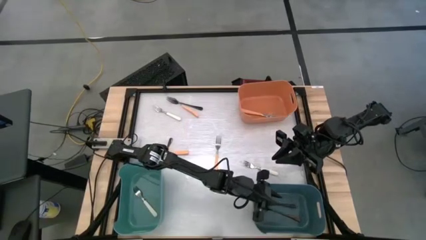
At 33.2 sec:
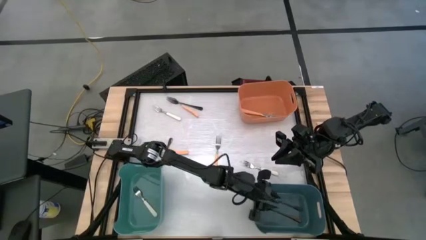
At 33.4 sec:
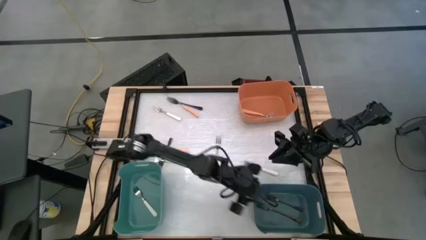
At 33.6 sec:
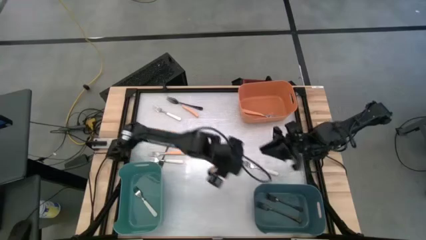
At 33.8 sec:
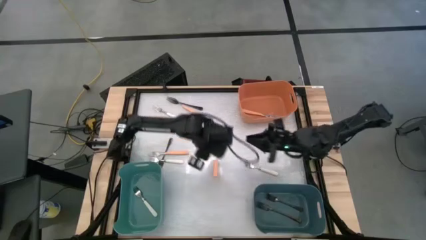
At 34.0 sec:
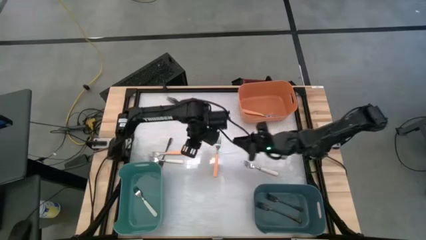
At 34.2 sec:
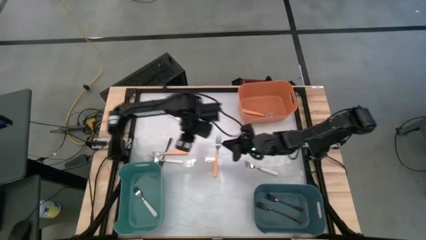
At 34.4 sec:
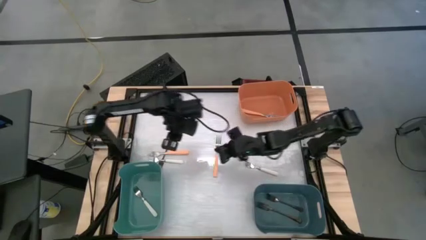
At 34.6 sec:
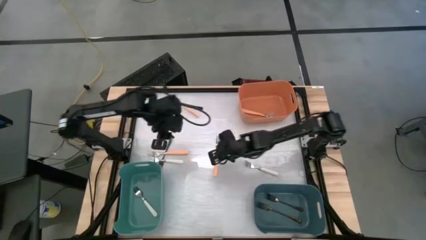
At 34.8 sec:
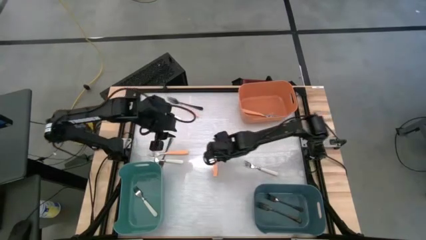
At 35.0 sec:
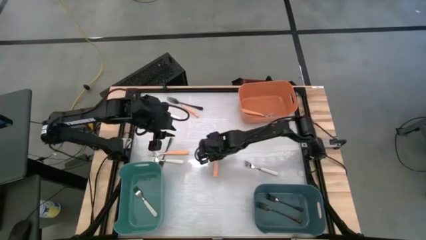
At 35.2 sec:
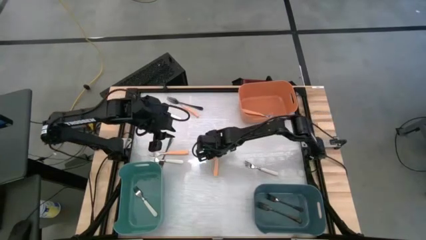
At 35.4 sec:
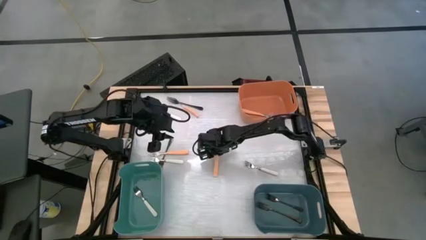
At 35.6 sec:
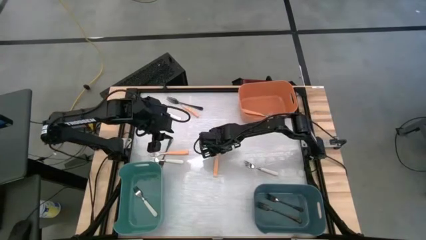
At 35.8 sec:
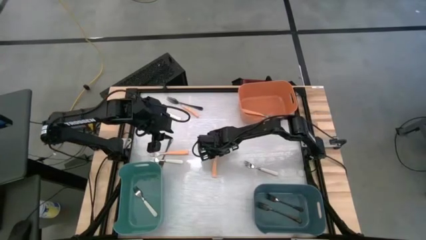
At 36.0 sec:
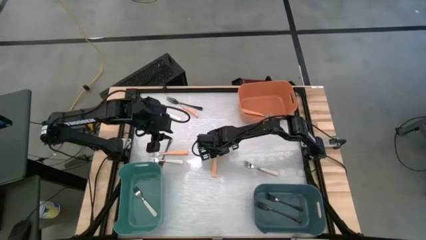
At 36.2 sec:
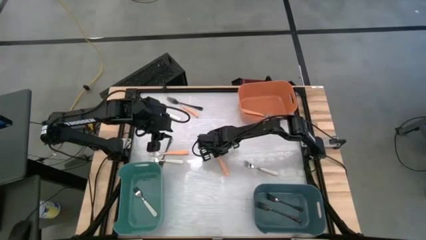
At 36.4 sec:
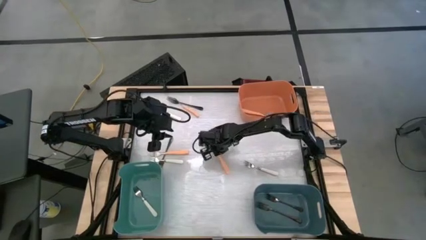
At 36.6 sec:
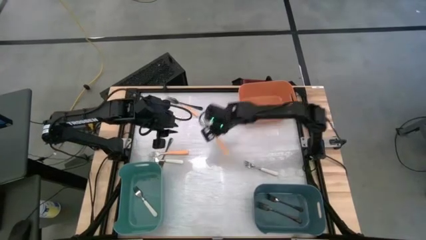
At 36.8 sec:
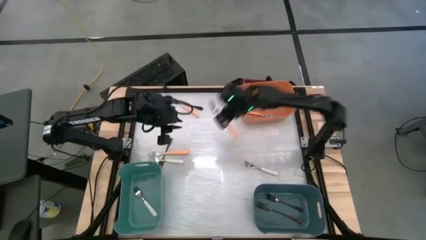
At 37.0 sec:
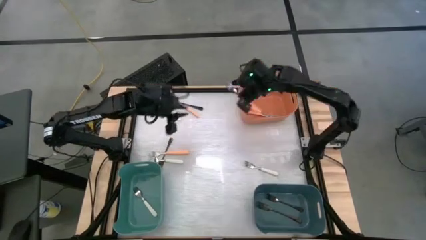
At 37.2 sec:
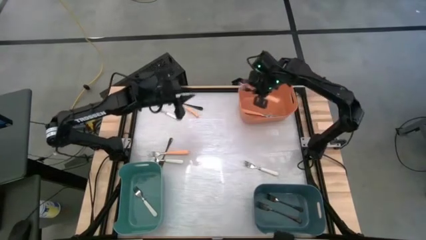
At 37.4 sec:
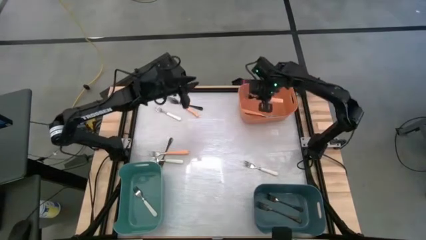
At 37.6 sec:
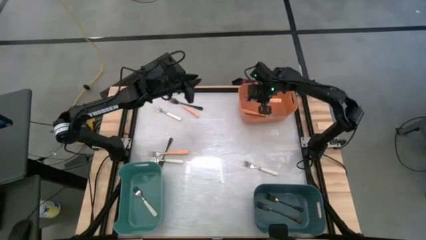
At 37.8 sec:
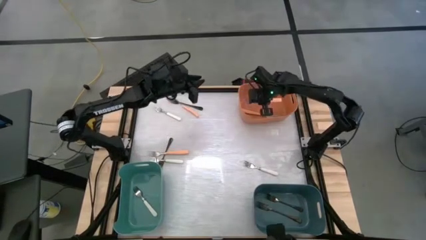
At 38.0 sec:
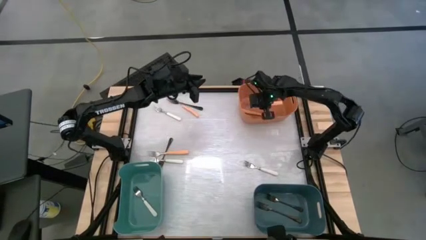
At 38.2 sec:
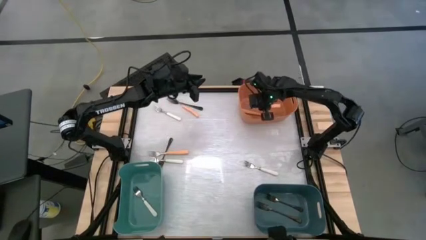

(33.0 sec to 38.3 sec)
Task: Sort silverware by color (type)
Put the orange fork into the orange bin

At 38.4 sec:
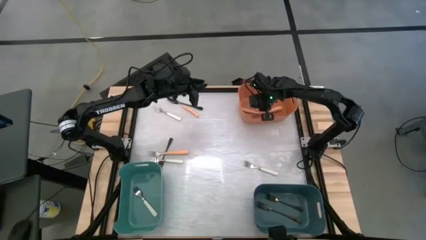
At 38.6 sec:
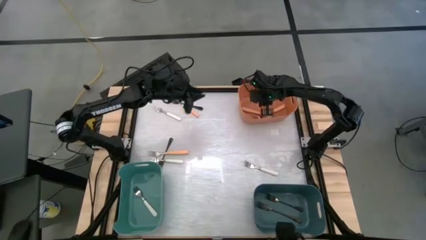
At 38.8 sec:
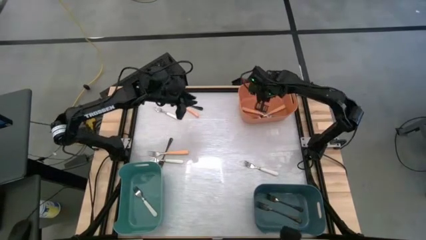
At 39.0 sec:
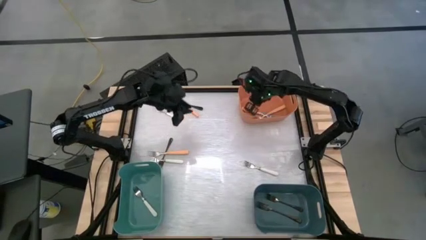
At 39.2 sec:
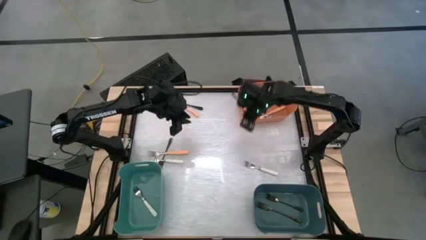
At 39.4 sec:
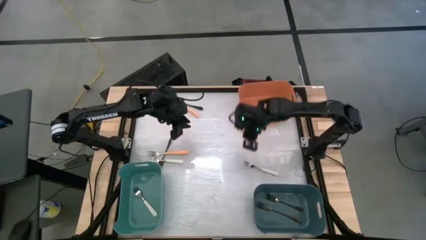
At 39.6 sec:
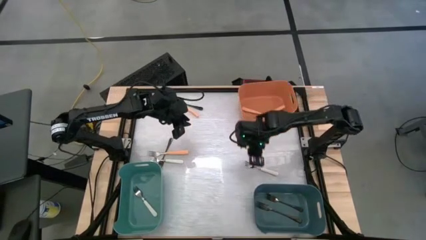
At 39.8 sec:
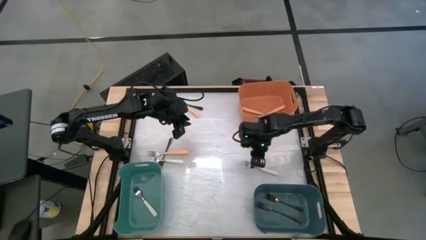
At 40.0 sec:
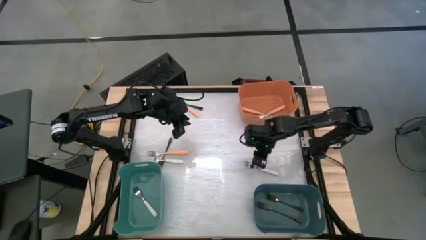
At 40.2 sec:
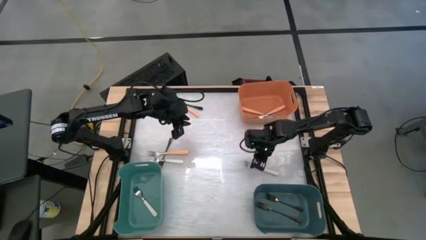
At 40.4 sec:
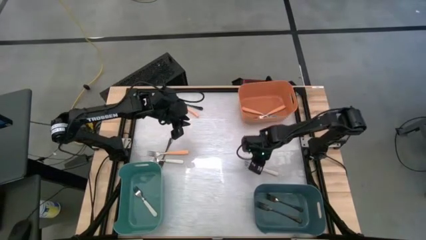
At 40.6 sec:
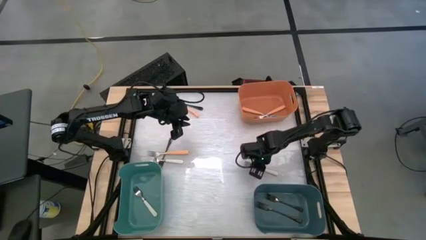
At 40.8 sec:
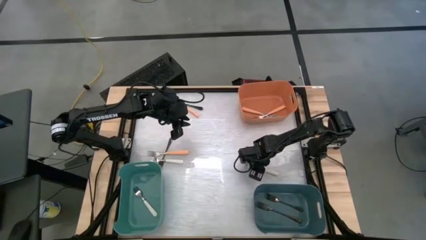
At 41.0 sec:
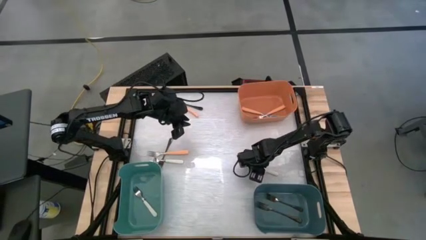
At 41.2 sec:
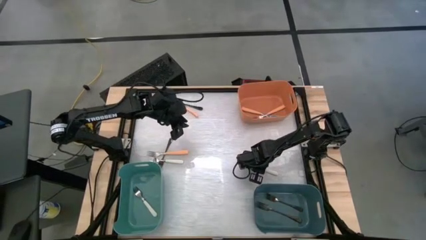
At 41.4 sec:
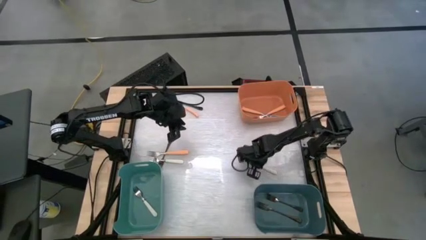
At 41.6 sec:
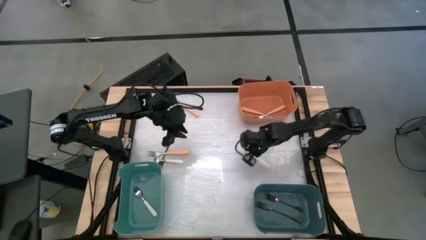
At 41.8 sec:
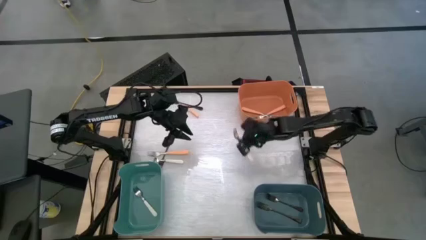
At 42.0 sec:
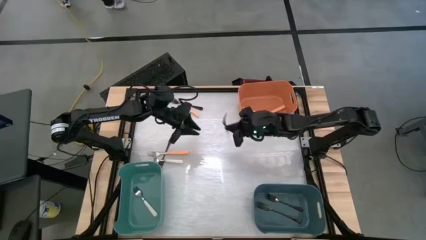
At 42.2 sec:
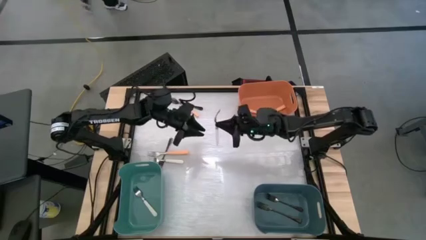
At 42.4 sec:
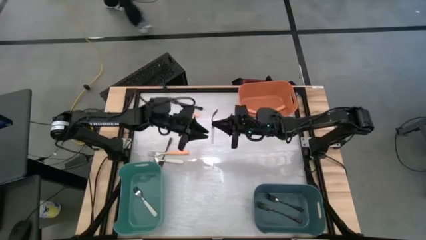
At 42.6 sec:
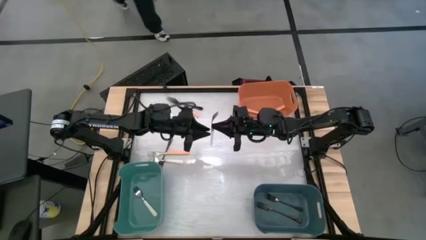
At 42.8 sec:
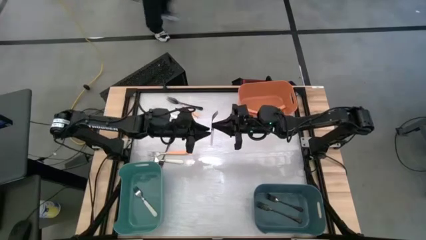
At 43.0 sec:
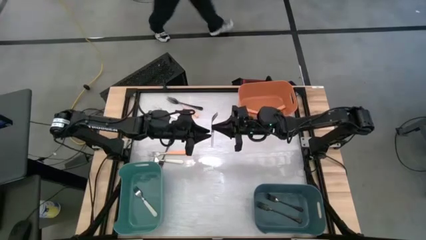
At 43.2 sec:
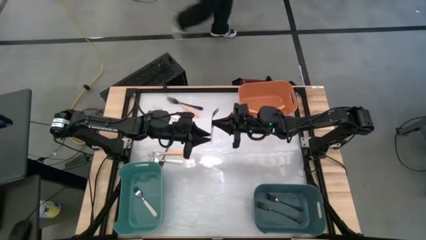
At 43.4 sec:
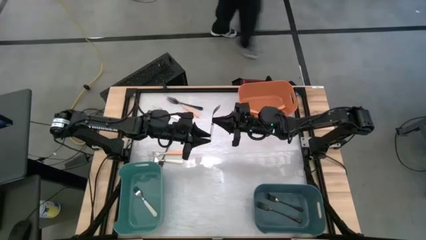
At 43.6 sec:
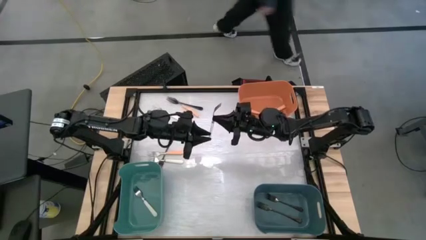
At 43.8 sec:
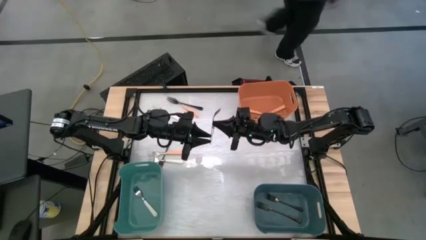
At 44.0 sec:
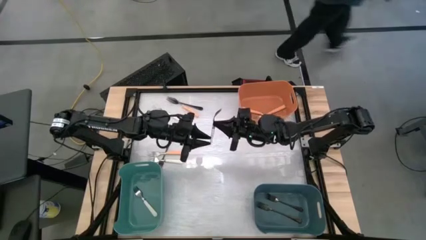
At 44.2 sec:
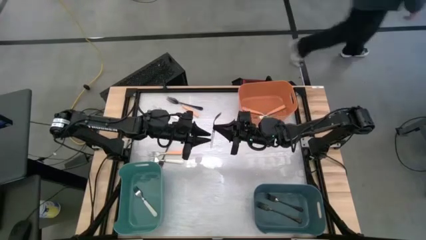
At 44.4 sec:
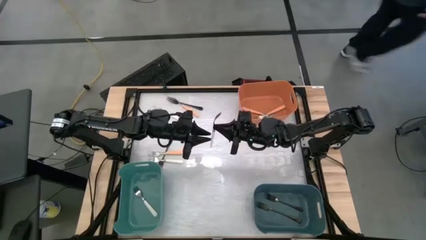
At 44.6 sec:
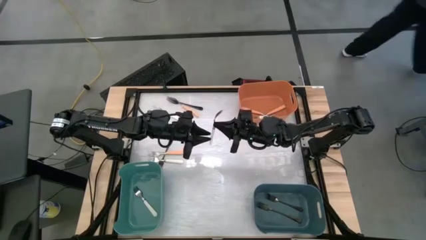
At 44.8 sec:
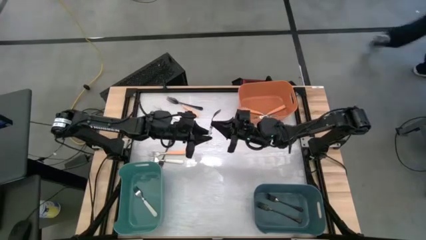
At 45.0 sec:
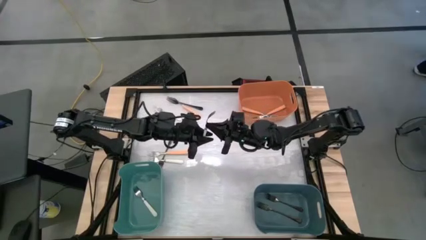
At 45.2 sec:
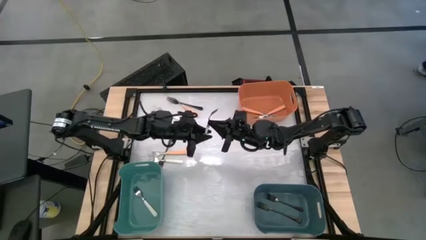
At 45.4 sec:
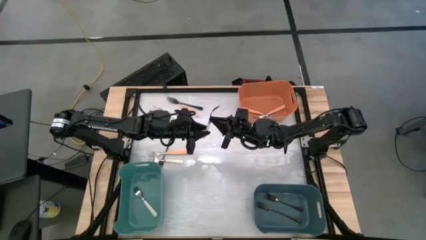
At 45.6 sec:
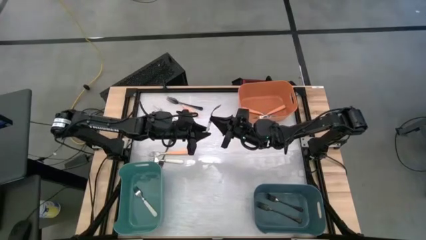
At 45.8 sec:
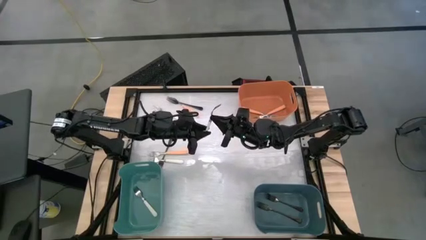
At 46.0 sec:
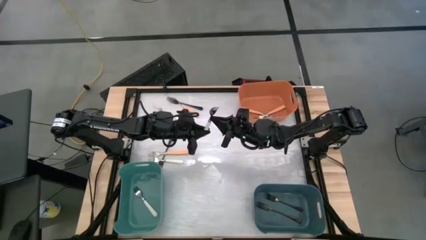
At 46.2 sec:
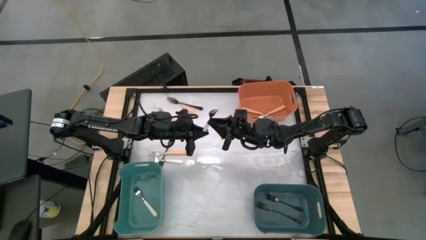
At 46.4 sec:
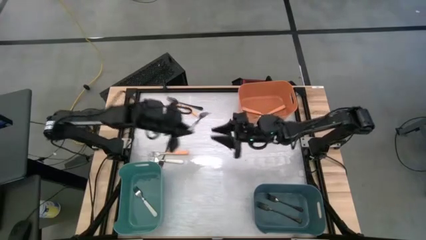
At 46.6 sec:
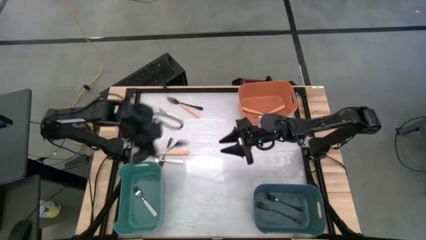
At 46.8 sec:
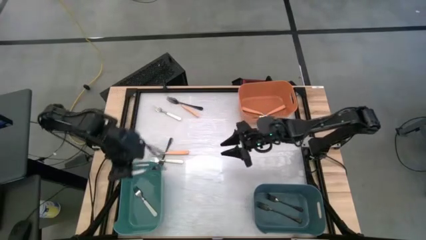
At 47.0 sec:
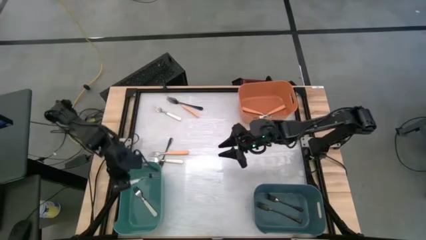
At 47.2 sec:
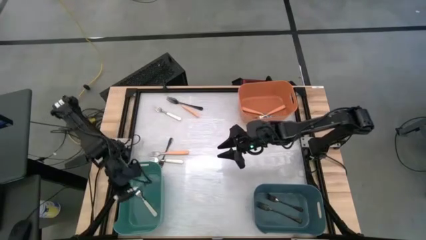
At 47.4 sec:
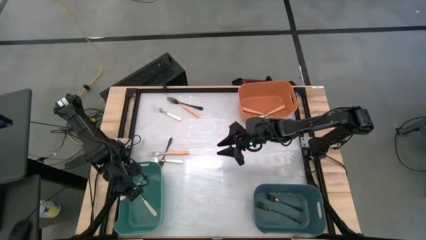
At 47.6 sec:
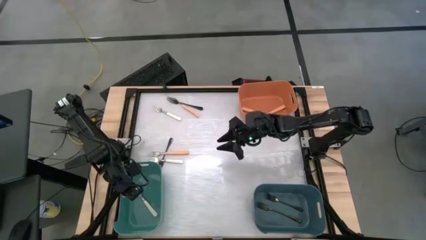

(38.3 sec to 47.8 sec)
Put the white fork into the green bin
